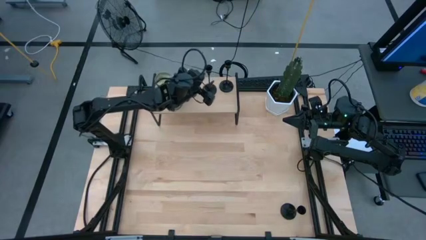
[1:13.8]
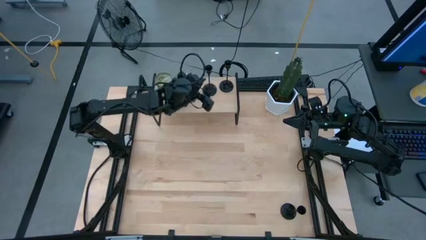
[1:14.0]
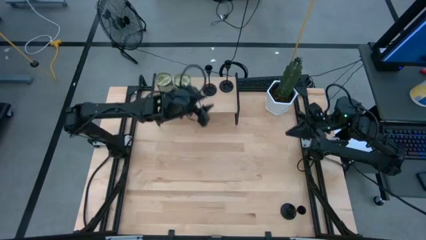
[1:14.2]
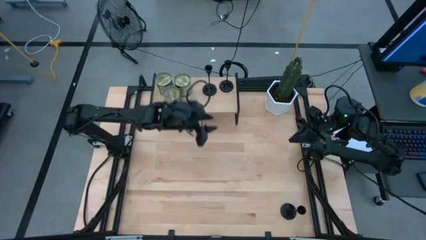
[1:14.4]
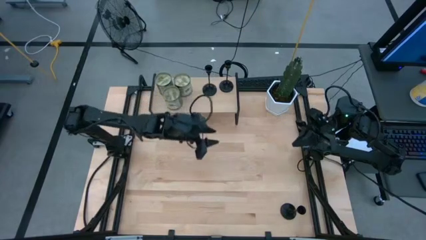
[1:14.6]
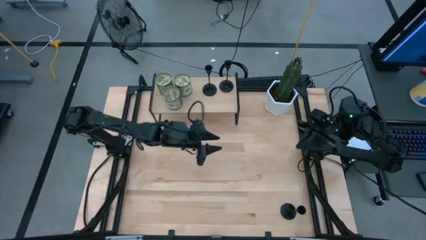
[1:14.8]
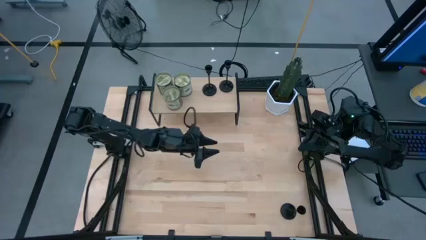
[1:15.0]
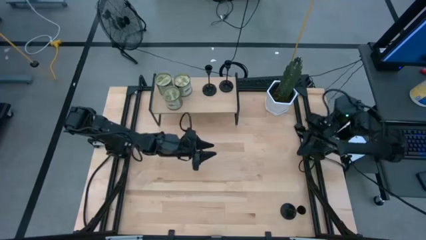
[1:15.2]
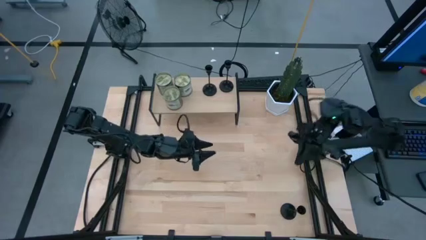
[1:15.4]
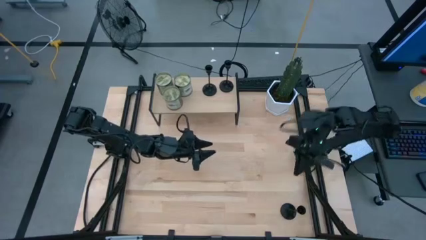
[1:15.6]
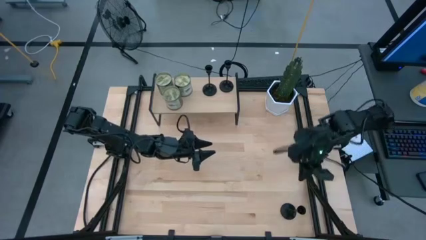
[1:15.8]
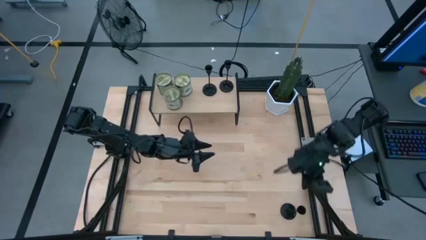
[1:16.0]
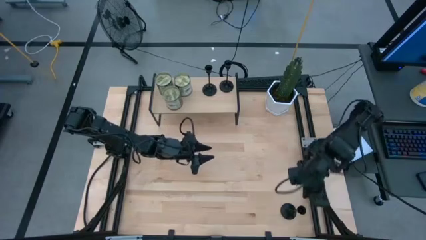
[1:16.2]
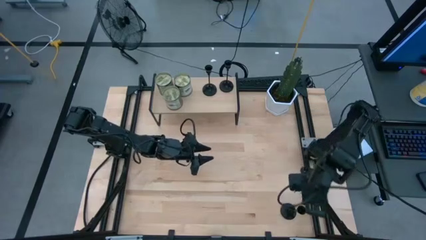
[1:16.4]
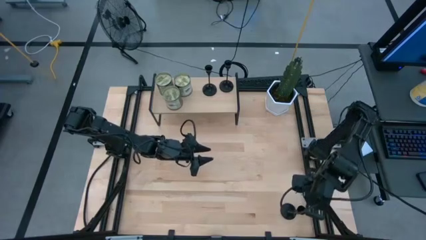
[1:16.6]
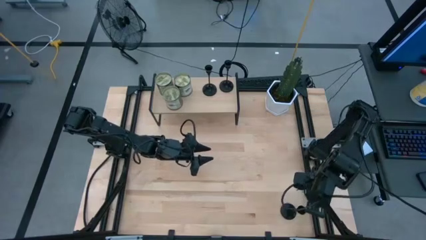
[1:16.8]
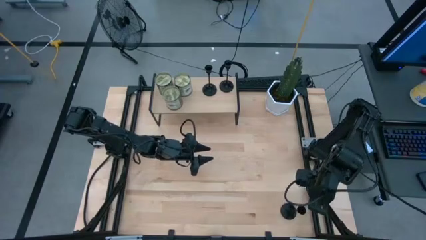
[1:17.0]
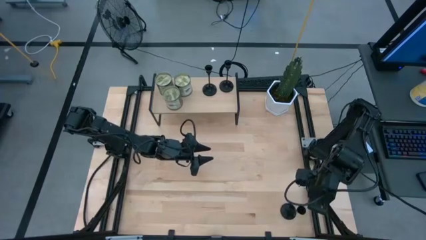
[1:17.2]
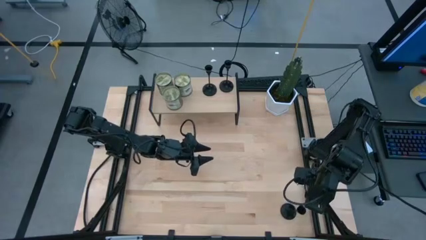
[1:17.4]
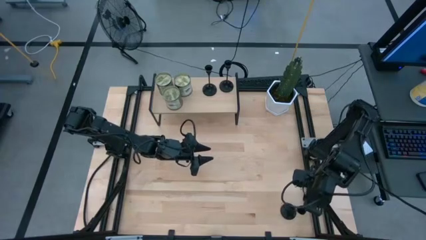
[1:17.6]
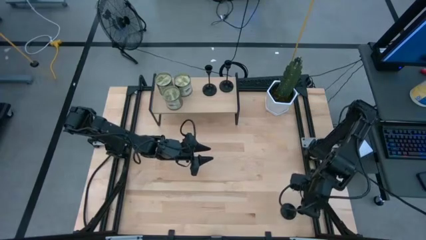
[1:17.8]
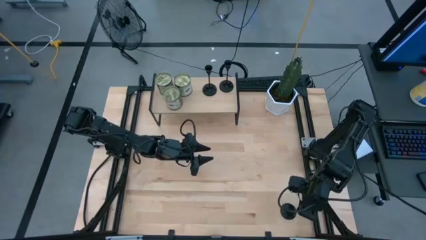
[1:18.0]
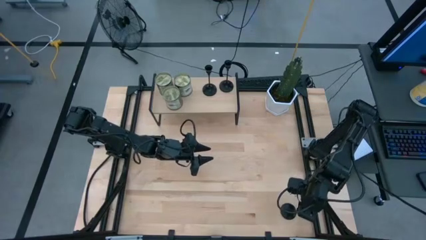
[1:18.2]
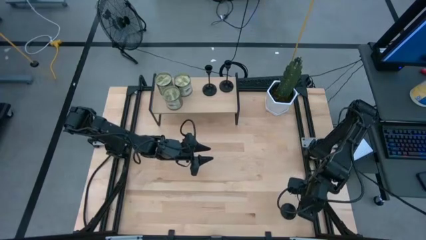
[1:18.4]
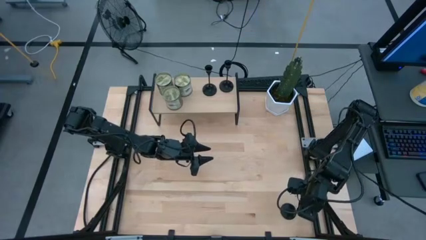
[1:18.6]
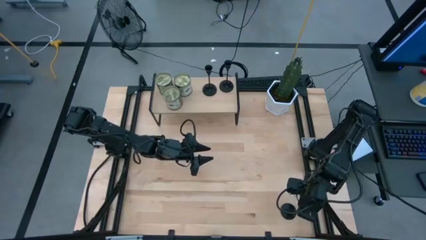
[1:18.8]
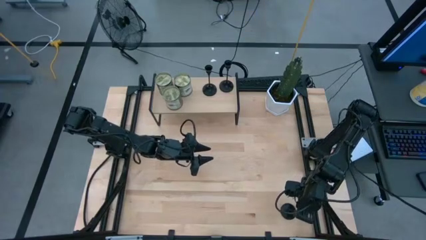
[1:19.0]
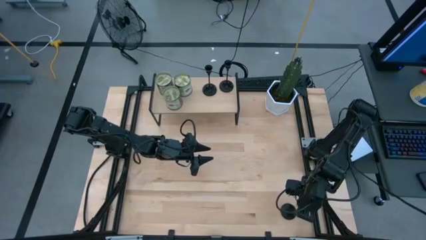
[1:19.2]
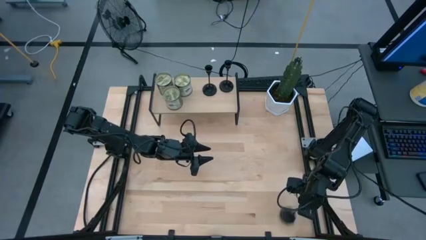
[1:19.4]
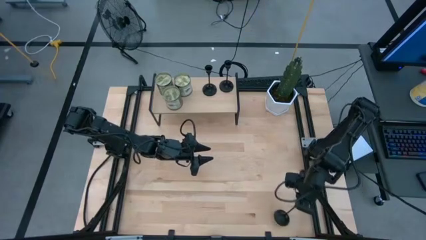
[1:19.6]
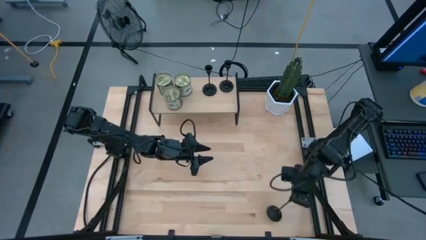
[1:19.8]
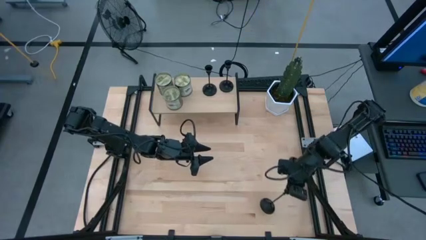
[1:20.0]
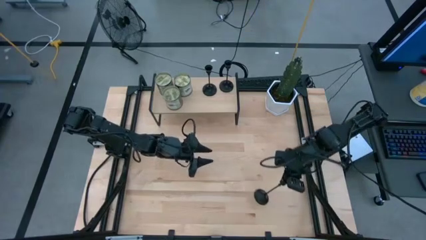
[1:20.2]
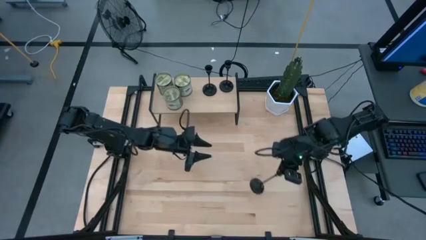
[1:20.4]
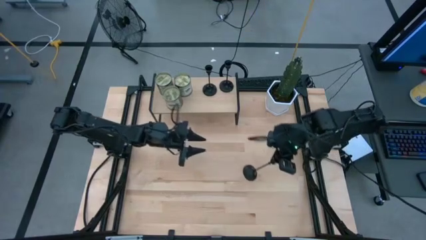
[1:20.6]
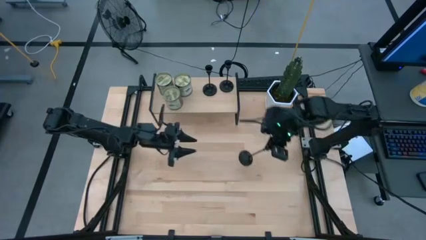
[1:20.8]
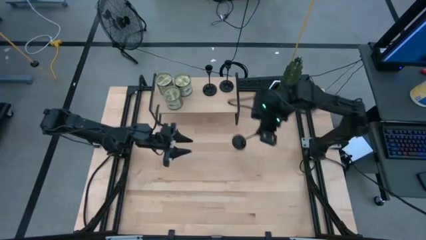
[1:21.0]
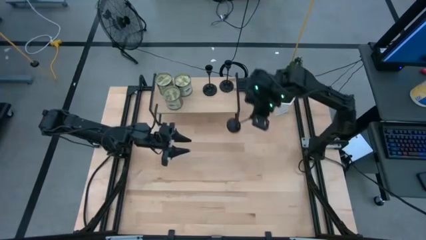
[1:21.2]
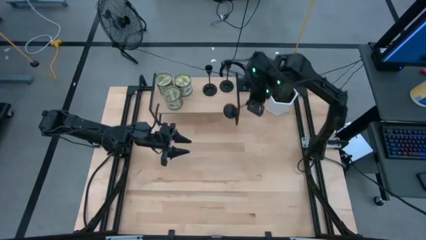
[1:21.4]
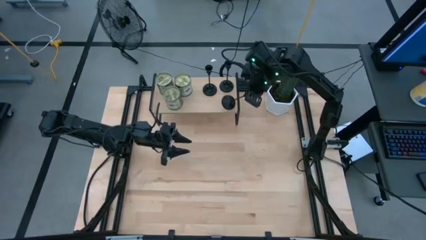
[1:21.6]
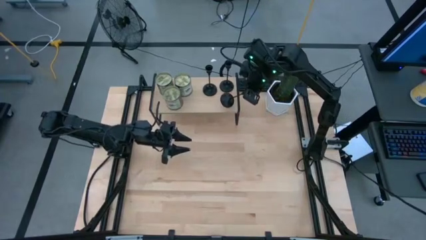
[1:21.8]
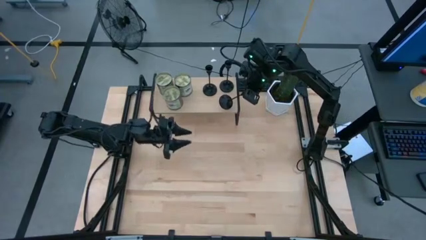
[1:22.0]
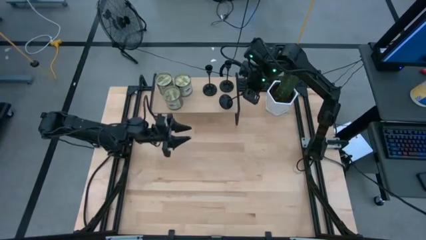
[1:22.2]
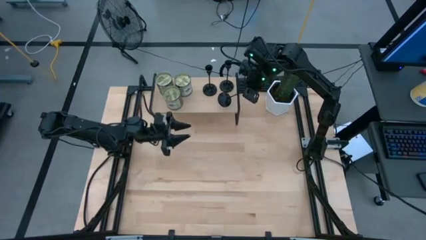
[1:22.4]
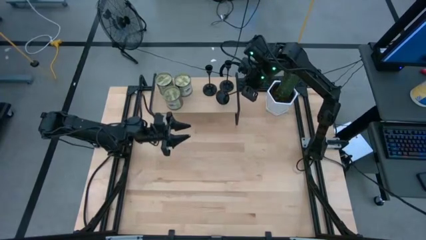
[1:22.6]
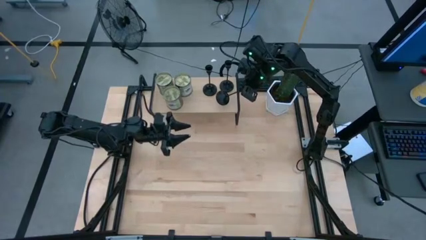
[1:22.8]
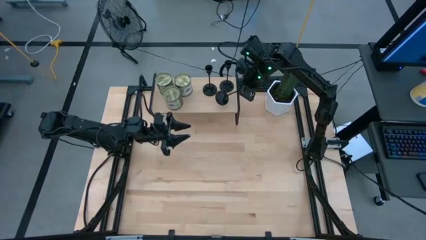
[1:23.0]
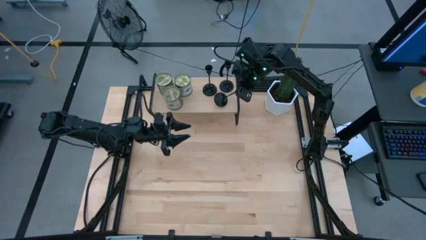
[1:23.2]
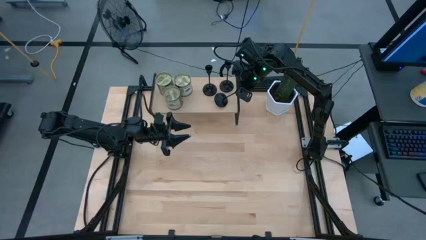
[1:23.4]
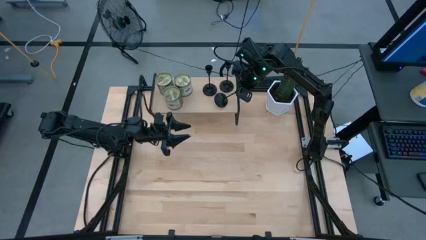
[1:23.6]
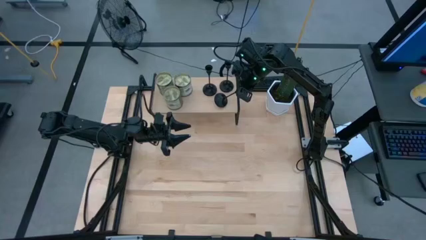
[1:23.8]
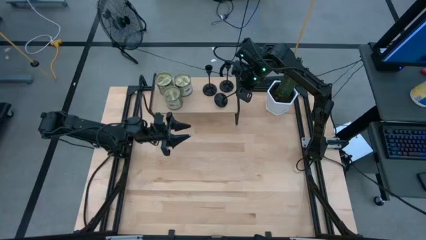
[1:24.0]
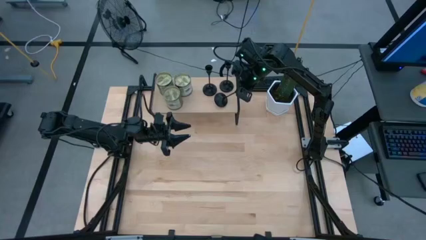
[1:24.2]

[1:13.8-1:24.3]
Task: Pick & Place candle stick holders
Put the black candle holder on the shelf

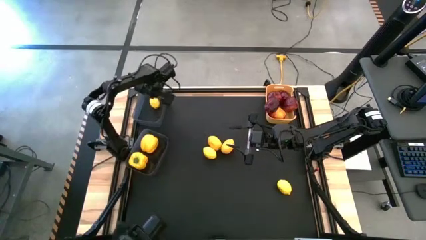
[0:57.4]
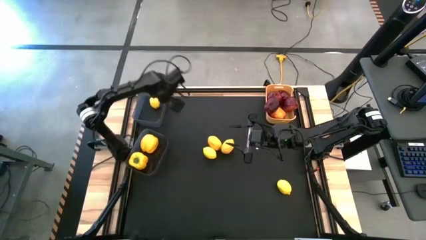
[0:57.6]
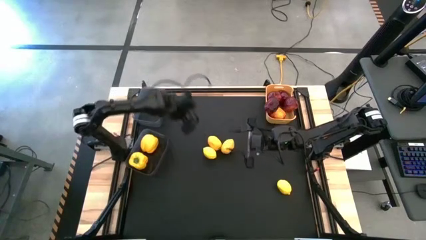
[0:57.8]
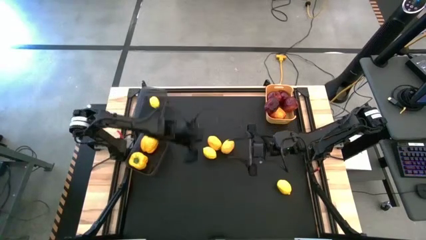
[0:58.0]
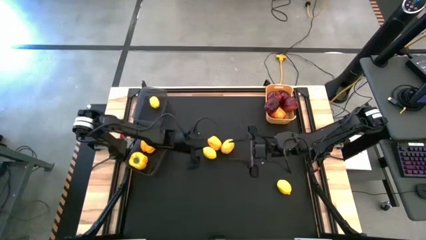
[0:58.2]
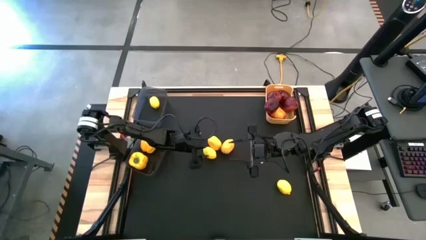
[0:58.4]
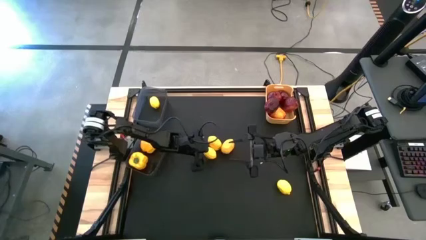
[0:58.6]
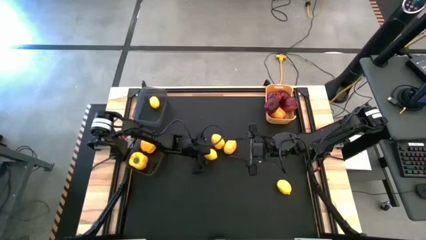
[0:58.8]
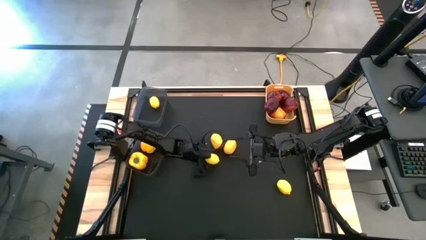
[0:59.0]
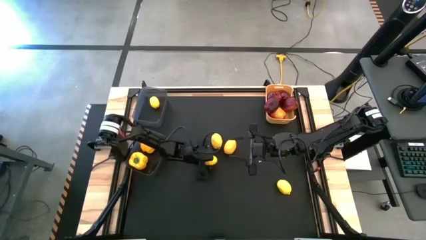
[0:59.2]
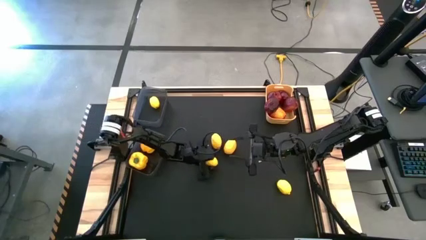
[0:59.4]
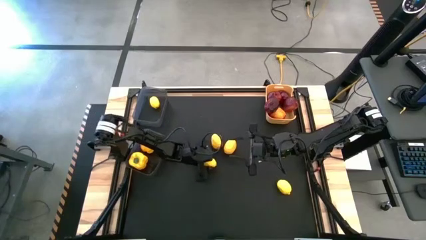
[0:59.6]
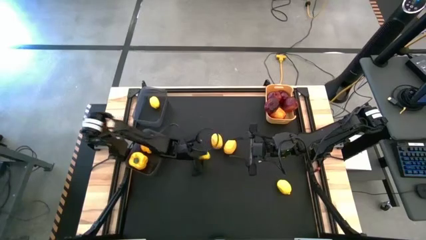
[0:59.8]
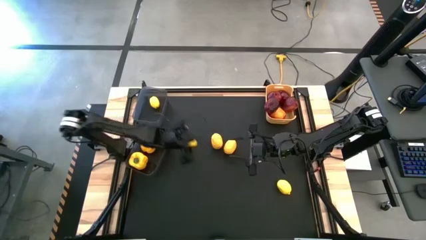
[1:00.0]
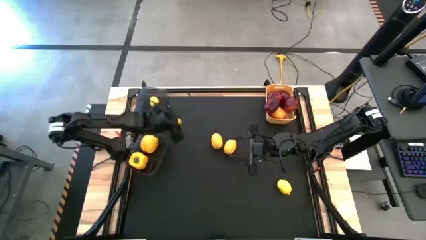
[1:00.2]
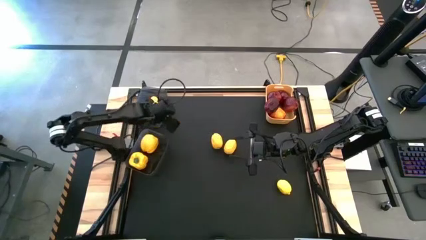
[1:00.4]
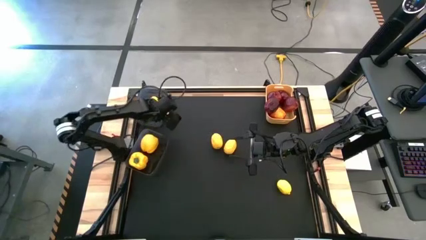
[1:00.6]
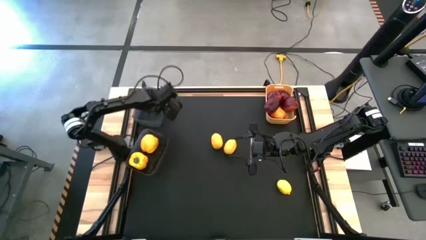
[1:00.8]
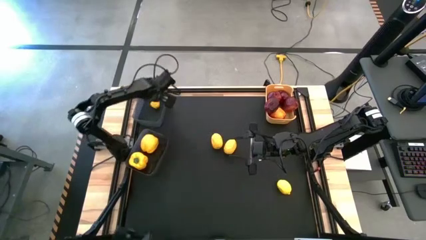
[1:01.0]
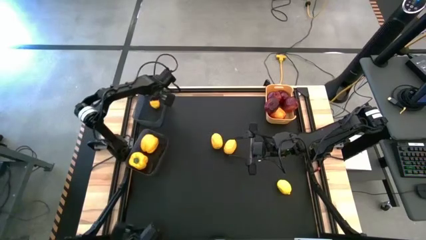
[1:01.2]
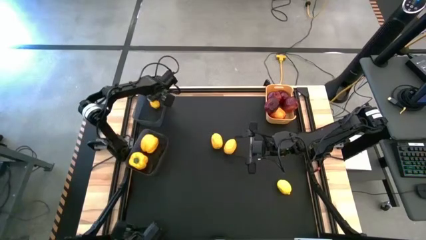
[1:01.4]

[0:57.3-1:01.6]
Task: Sort produce into baskets
Put the lemon into the top black bin

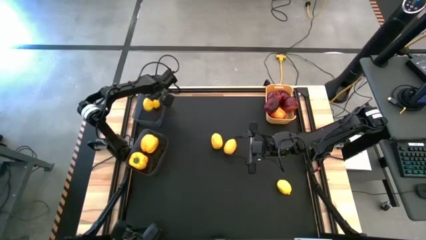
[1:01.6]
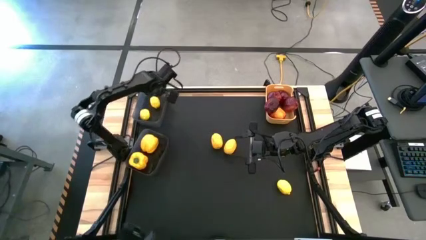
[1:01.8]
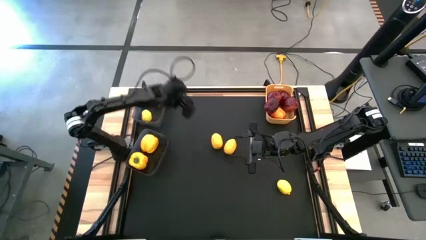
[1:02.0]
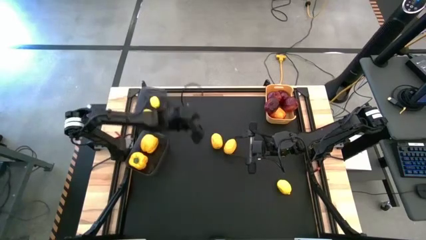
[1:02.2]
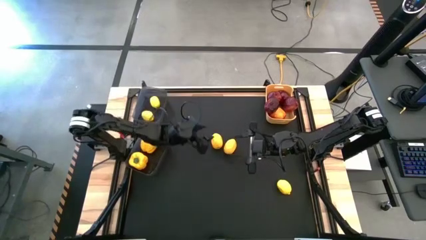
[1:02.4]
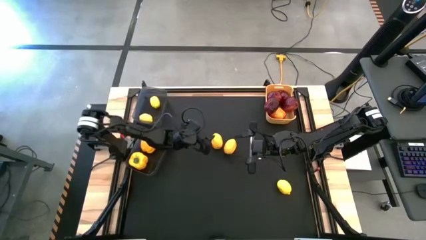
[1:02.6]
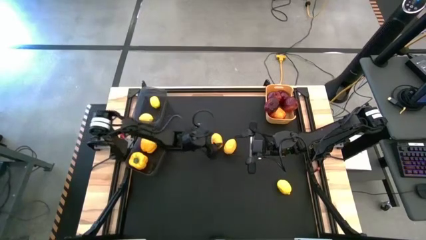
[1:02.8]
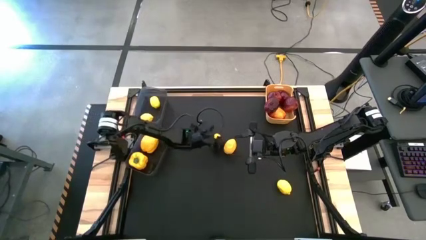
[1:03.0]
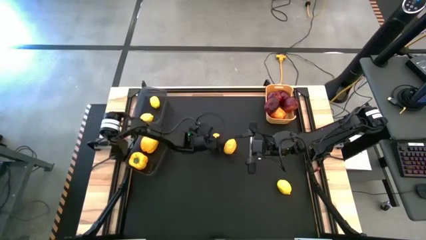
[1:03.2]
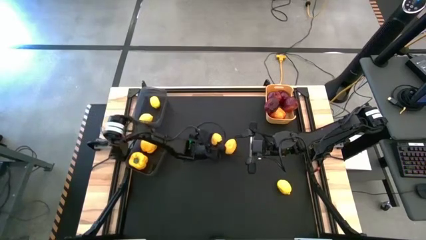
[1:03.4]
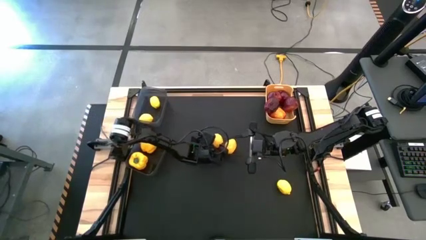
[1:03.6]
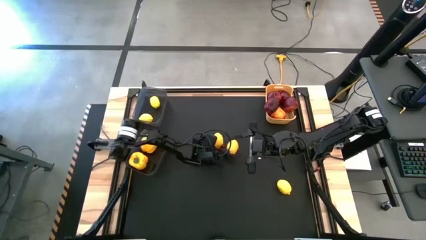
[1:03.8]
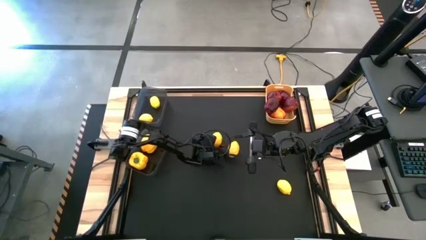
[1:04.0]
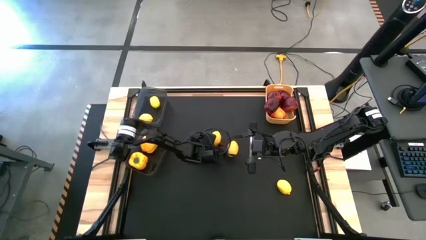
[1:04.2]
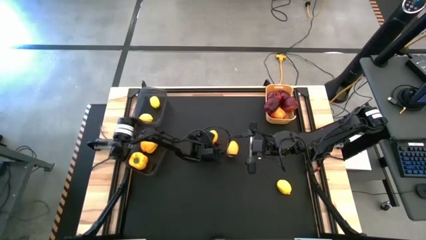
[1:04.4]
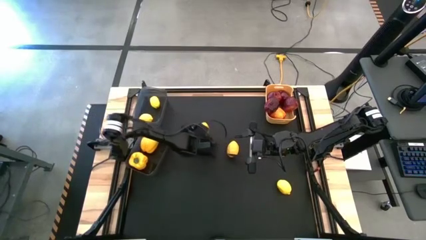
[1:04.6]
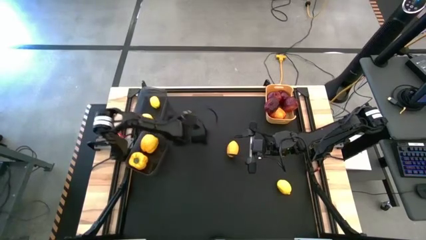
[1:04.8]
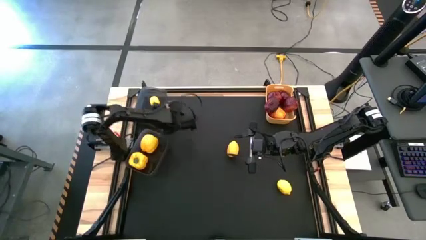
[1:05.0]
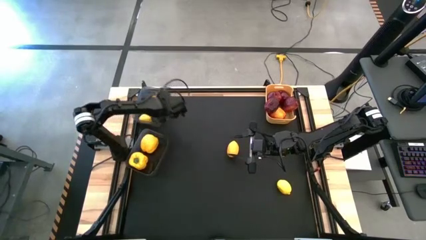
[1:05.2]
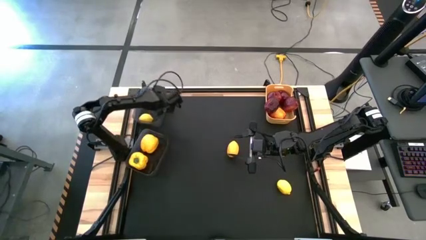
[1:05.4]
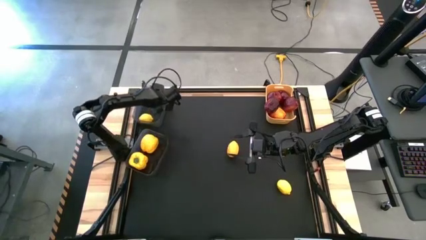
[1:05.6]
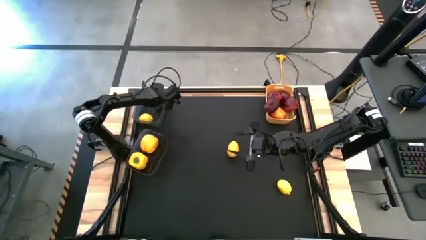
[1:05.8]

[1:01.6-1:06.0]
Put the lemon into the top black bin
